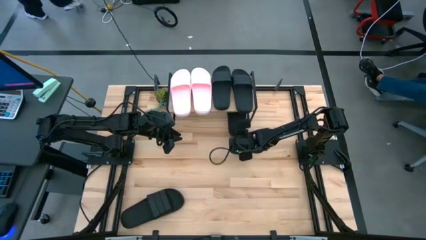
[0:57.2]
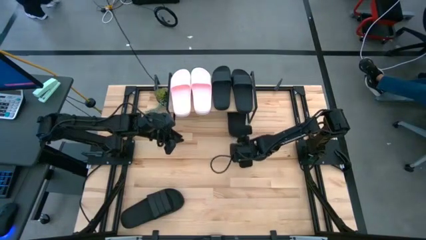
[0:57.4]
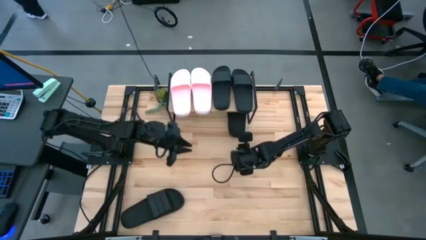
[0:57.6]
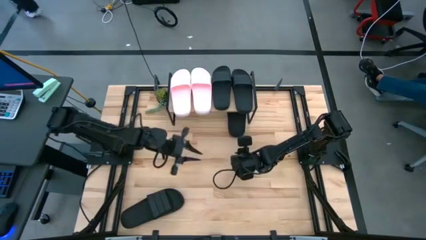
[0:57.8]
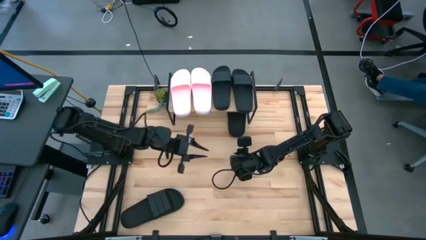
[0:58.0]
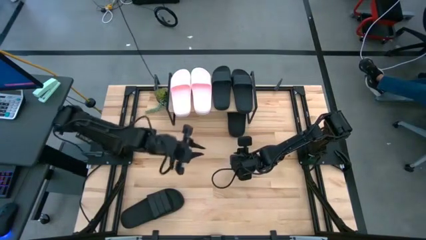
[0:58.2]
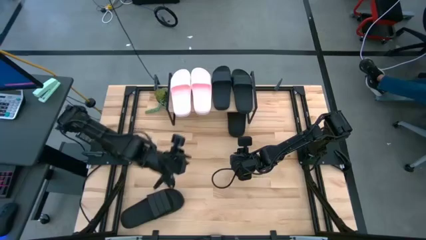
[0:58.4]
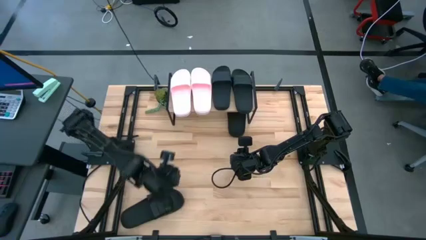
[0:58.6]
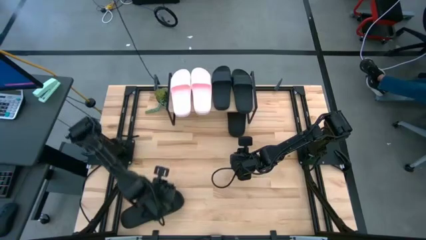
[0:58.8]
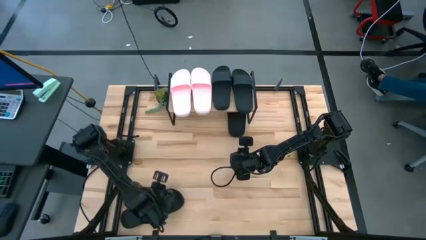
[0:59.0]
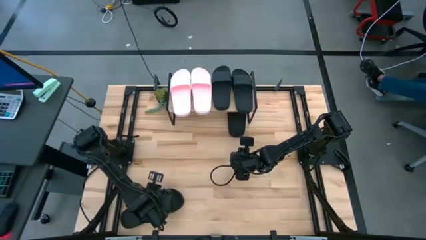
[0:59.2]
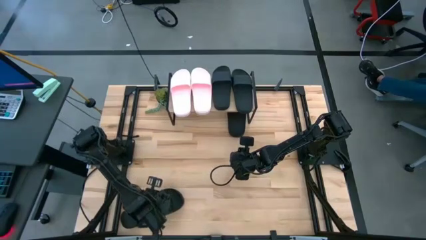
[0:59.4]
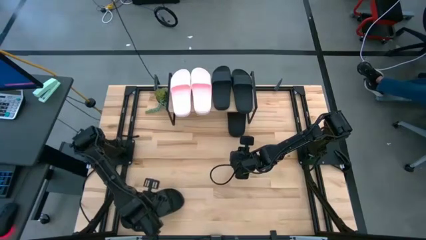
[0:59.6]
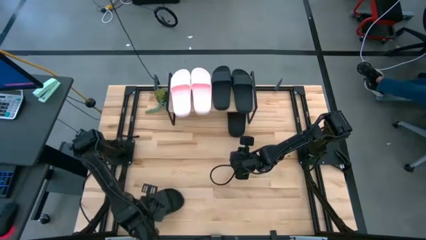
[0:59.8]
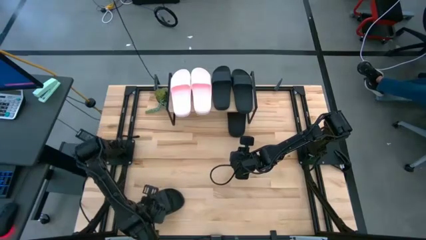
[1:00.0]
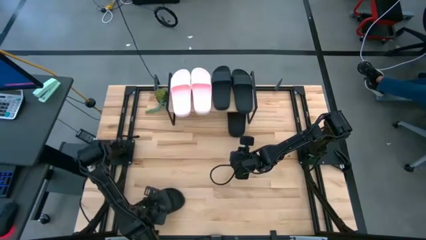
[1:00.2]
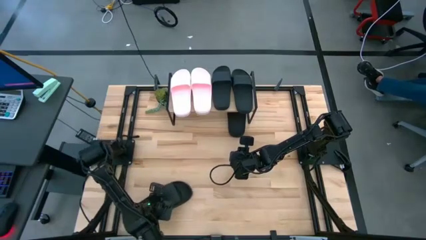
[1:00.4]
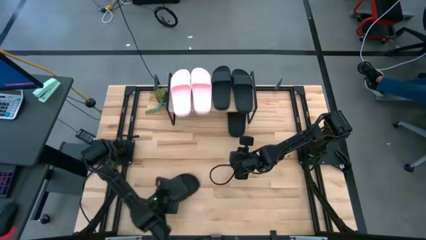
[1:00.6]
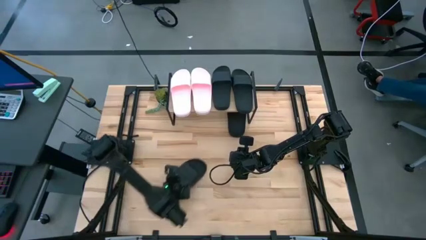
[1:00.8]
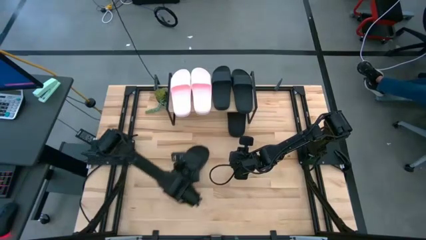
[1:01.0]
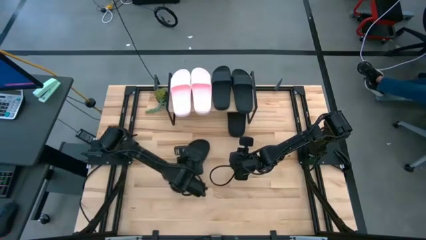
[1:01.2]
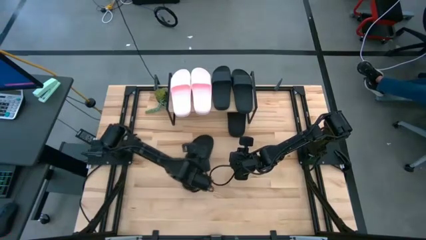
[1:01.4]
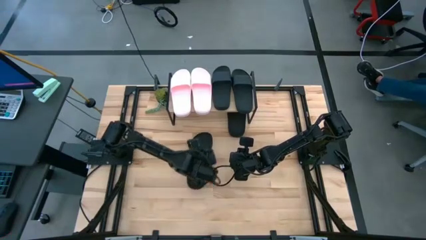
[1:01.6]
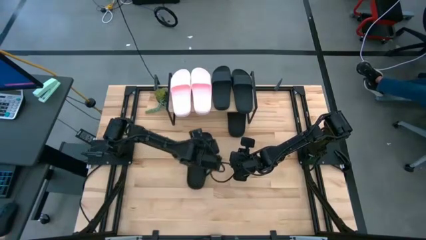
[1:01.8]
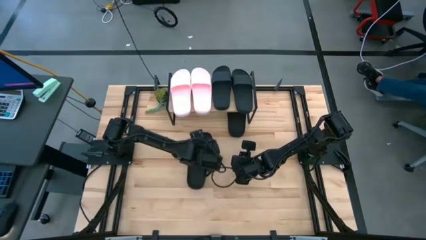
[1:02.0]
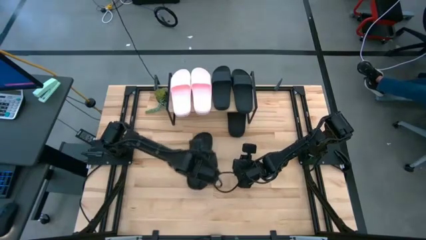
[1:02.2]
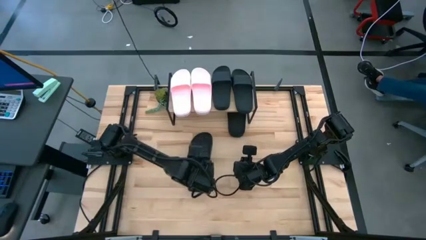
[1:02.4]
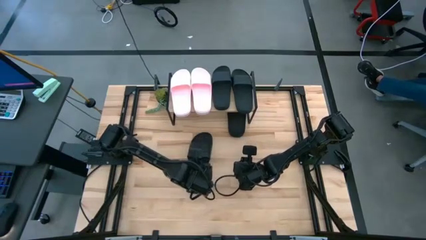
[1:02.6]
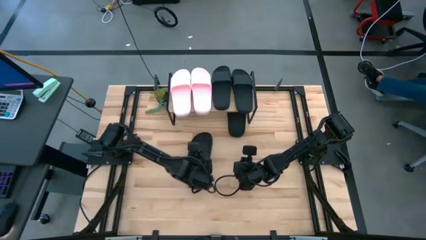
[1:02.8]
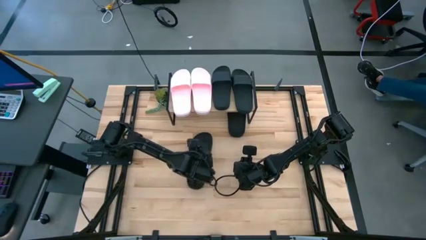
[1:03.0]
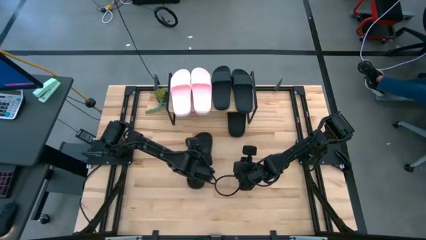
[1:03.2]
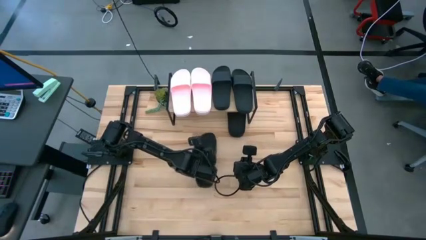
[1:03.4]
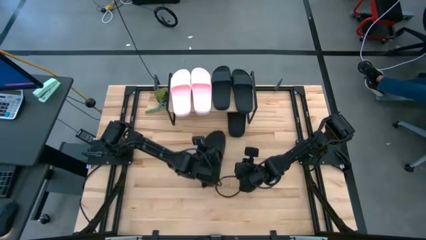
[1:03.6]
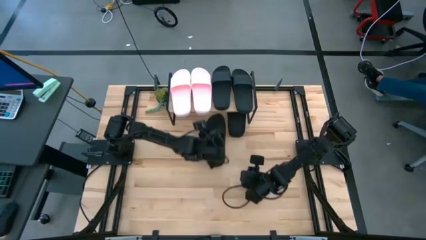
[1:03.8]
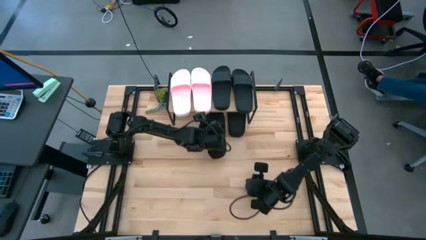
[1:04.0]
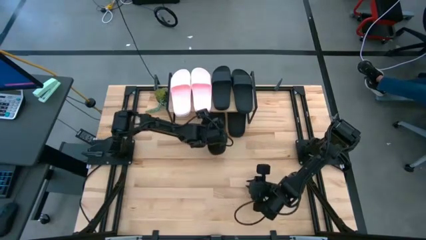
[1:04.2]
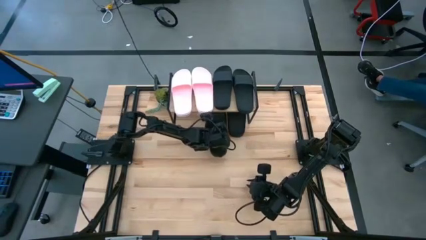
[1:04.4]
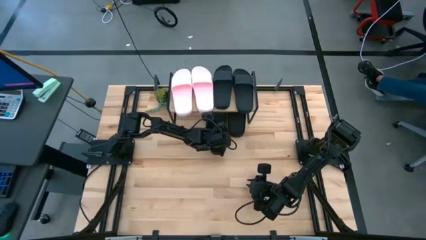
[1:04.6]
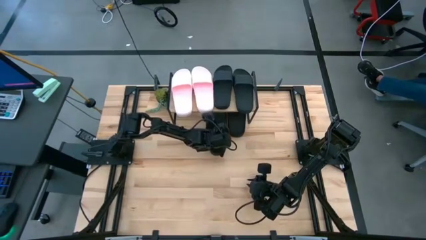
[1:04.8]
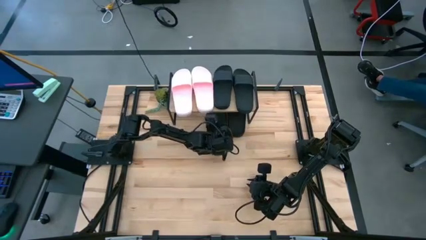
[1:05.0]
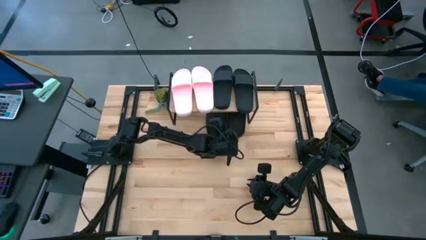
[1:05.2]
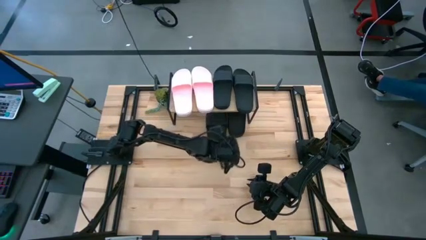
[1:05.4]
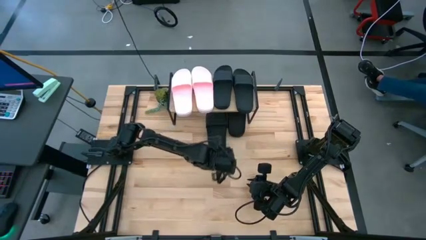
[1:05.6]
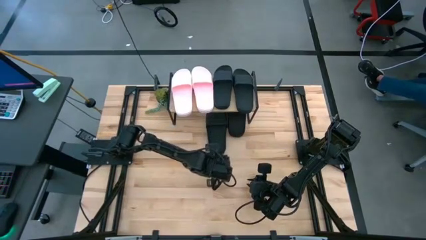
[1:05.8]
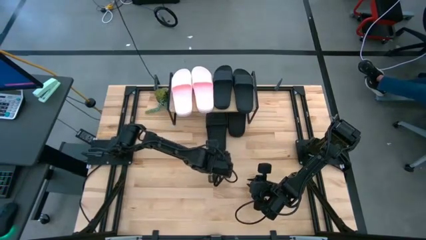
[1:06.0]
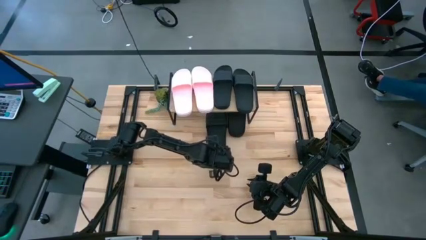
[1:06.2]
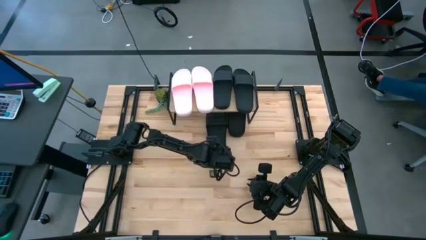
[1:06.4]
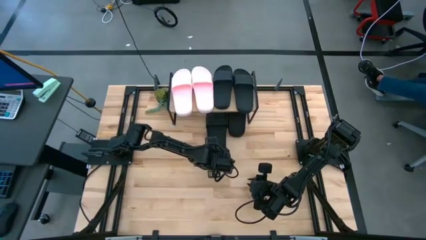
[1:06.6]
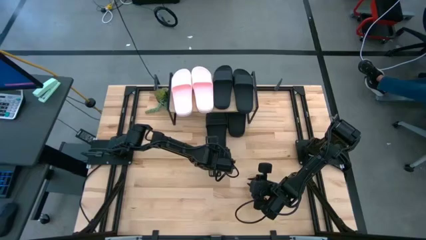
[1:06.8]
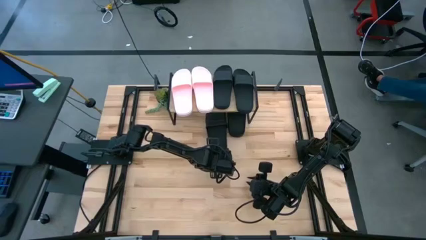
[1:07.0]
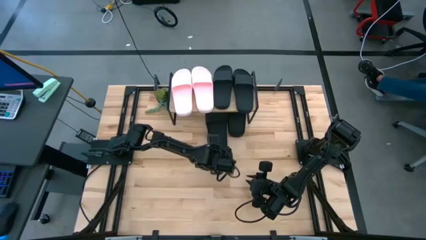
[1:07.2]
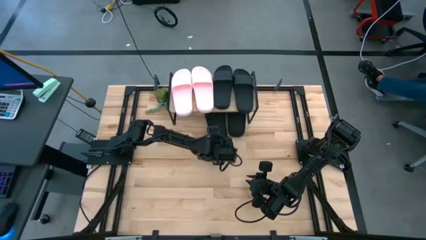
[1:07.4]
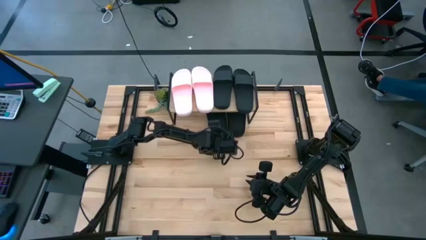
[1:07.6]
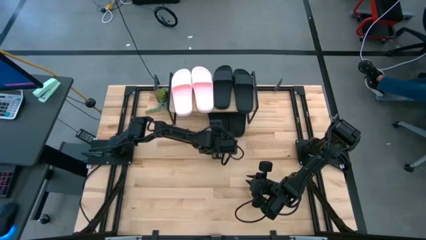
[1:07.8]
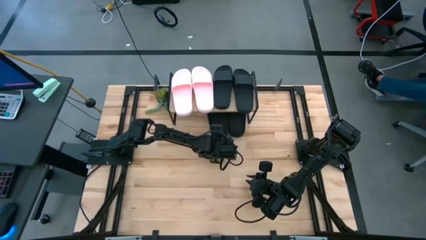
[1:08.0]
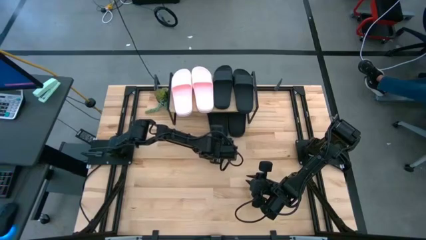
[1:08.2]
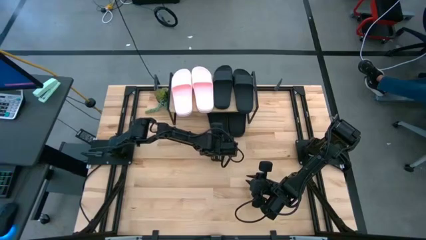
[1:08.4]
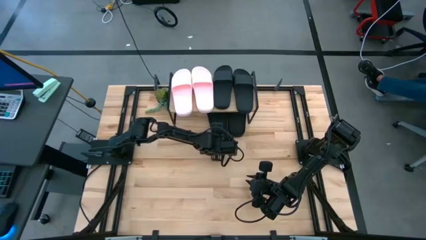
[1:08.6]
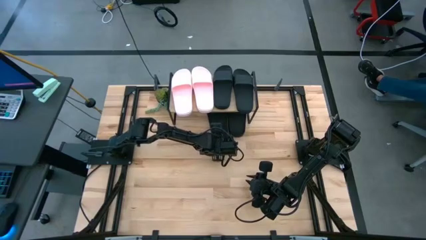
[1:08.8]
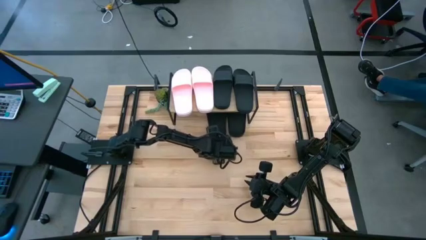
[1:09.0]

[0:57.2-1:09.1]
Task: Pick and place slides into the shelf
Put the black slide under the shelf
